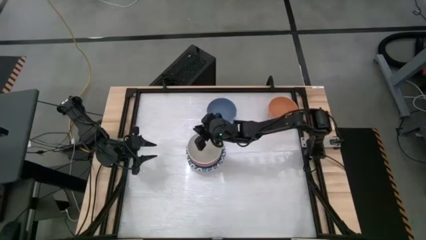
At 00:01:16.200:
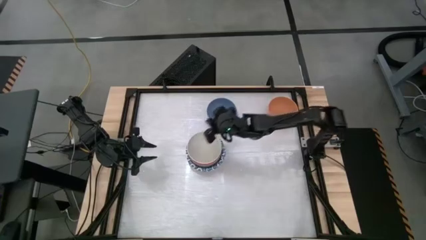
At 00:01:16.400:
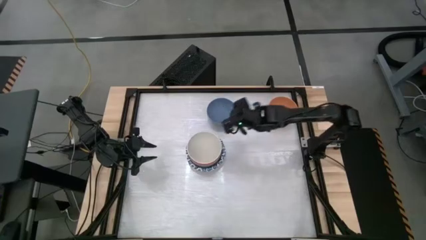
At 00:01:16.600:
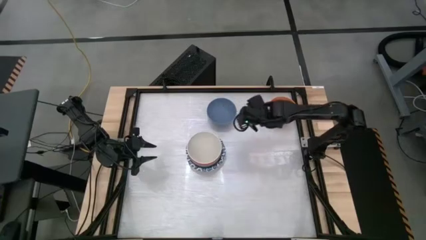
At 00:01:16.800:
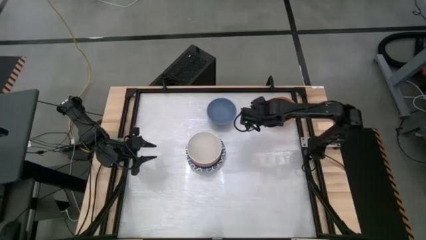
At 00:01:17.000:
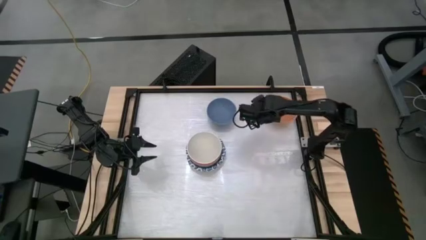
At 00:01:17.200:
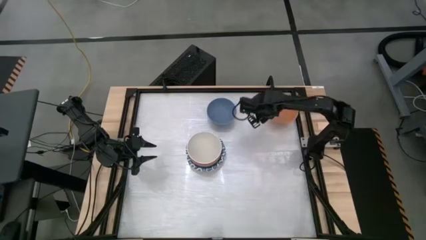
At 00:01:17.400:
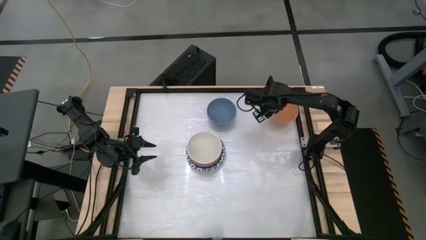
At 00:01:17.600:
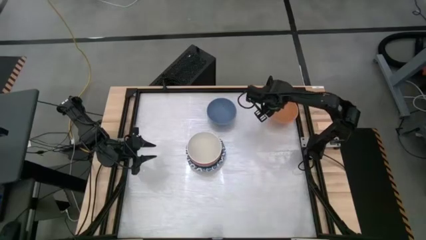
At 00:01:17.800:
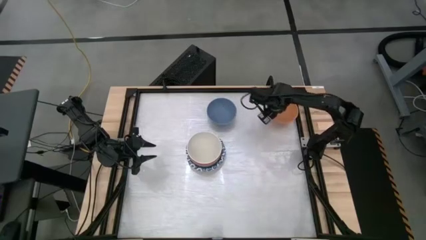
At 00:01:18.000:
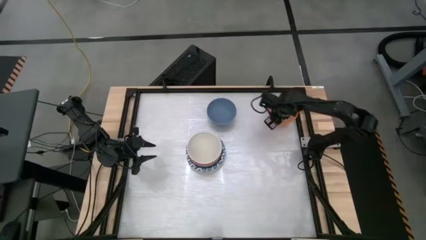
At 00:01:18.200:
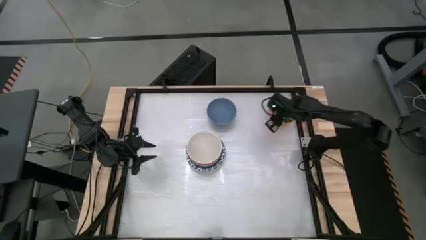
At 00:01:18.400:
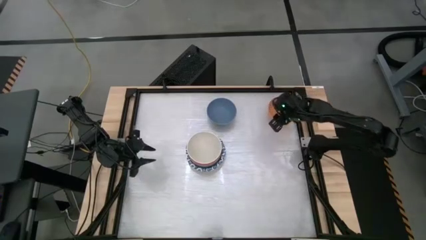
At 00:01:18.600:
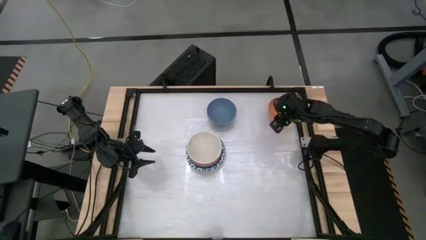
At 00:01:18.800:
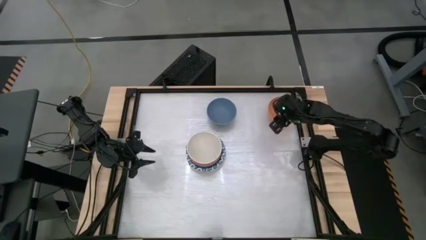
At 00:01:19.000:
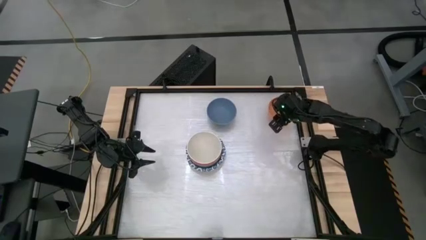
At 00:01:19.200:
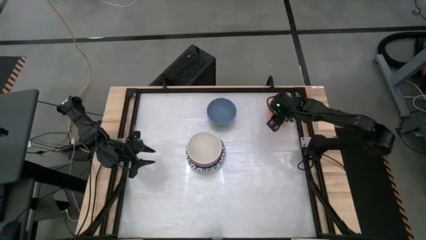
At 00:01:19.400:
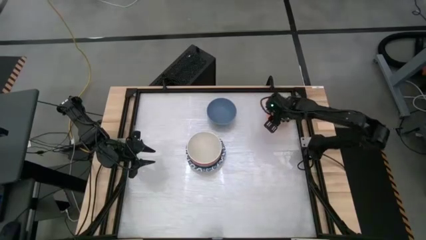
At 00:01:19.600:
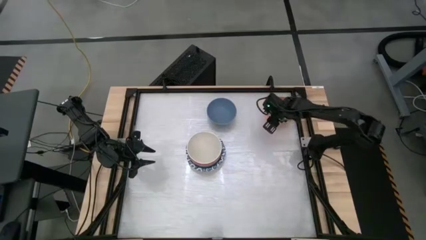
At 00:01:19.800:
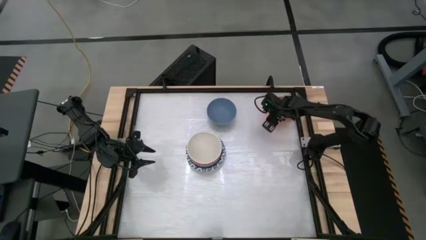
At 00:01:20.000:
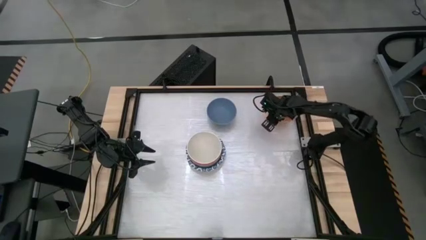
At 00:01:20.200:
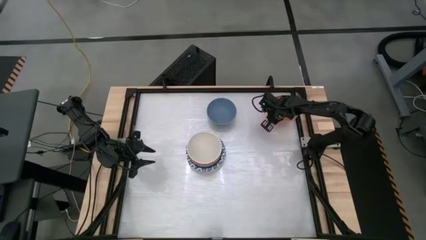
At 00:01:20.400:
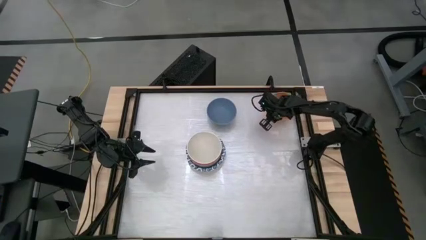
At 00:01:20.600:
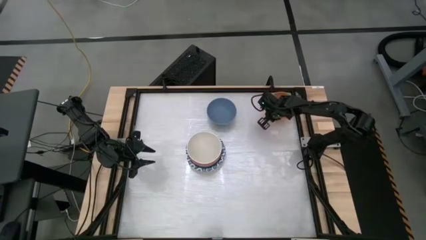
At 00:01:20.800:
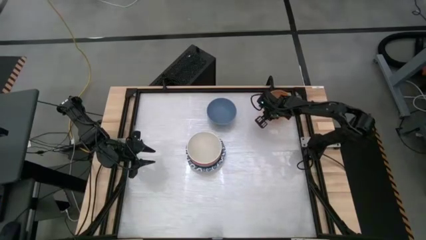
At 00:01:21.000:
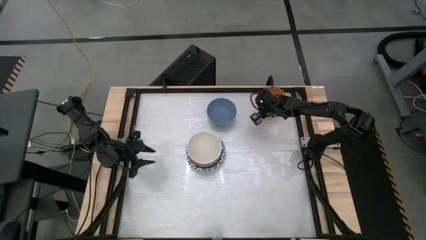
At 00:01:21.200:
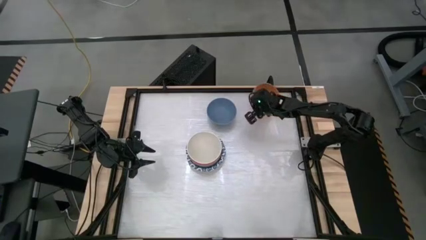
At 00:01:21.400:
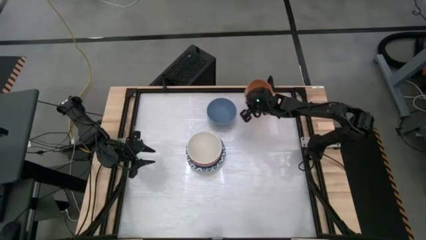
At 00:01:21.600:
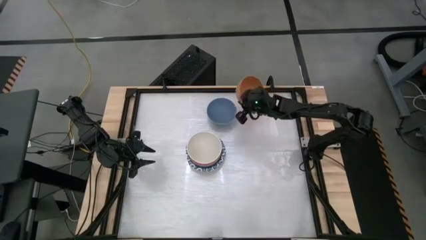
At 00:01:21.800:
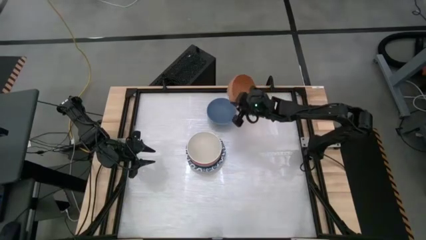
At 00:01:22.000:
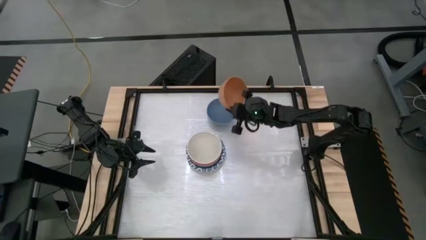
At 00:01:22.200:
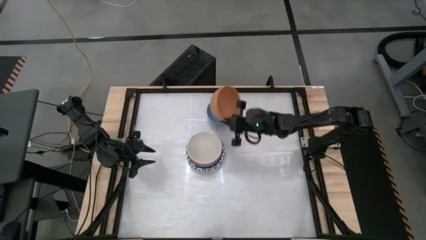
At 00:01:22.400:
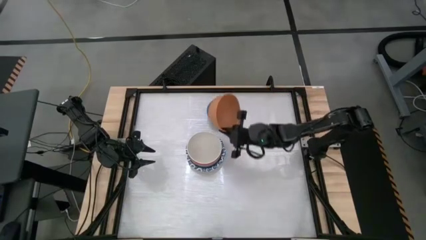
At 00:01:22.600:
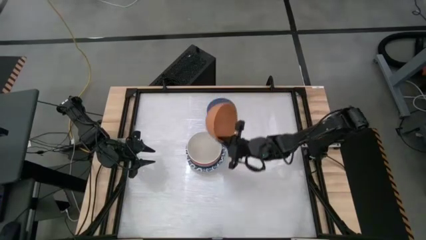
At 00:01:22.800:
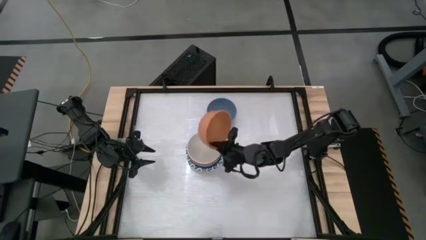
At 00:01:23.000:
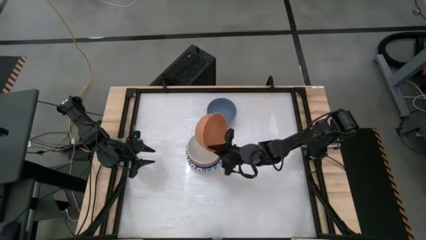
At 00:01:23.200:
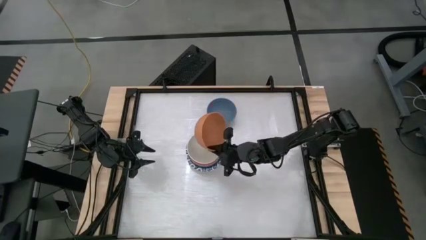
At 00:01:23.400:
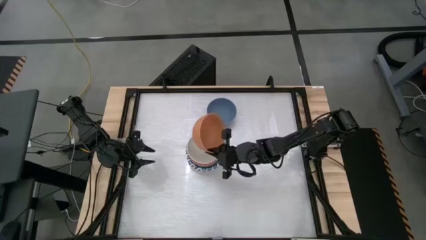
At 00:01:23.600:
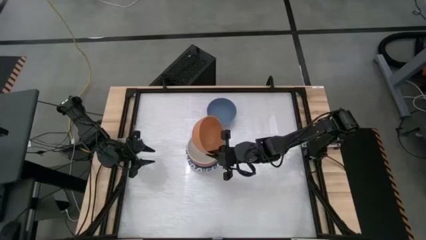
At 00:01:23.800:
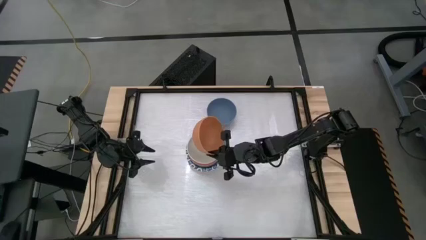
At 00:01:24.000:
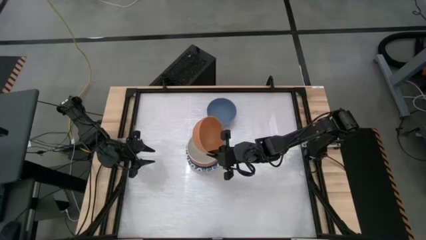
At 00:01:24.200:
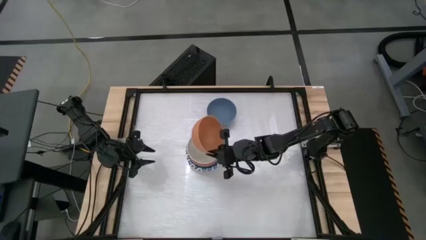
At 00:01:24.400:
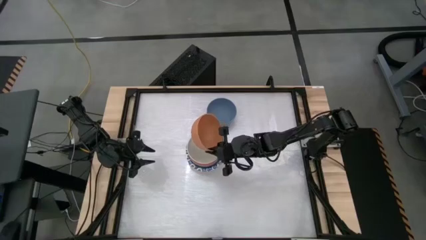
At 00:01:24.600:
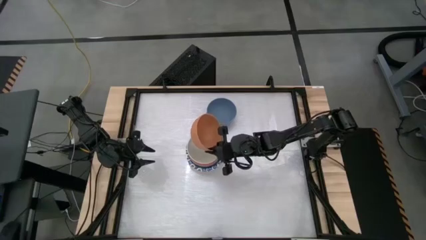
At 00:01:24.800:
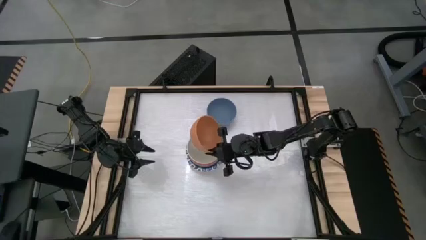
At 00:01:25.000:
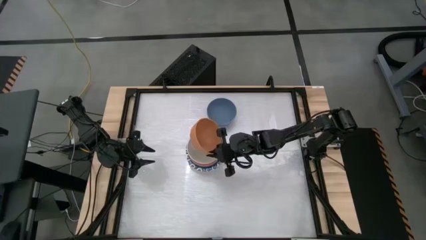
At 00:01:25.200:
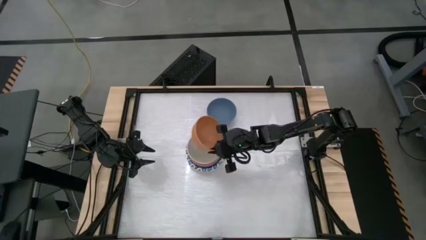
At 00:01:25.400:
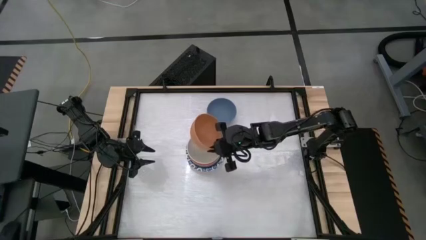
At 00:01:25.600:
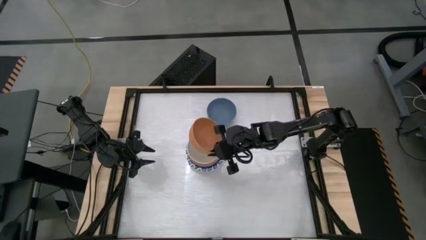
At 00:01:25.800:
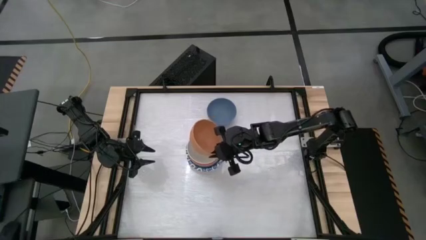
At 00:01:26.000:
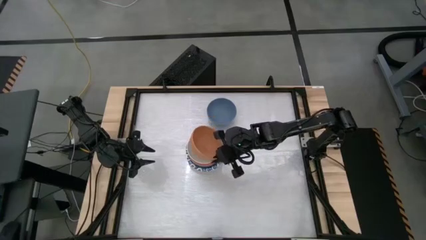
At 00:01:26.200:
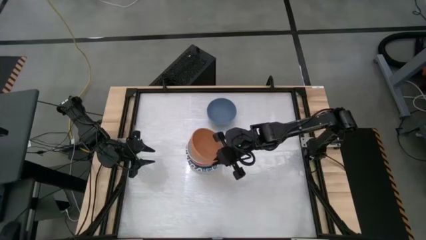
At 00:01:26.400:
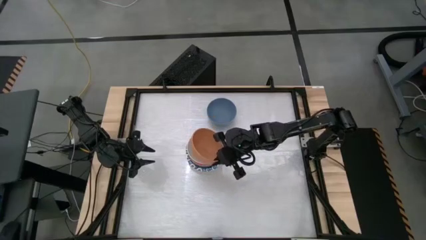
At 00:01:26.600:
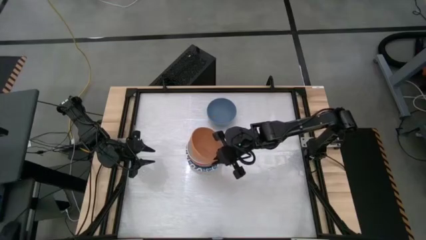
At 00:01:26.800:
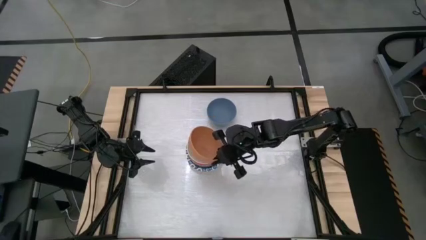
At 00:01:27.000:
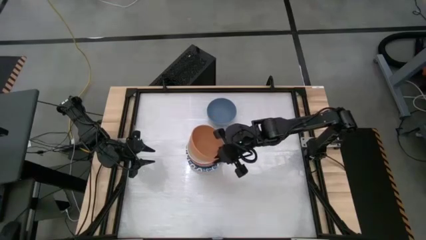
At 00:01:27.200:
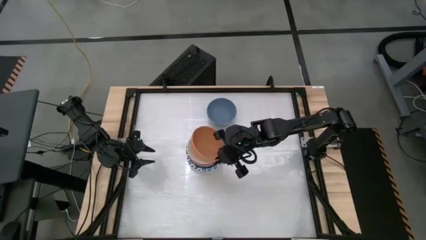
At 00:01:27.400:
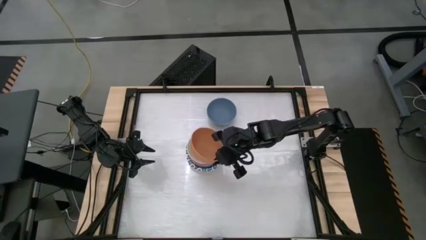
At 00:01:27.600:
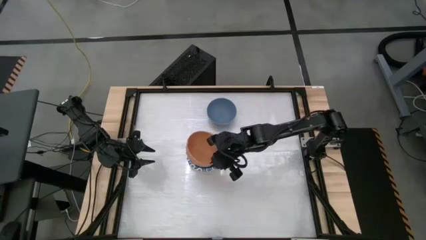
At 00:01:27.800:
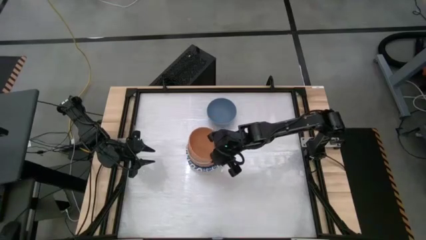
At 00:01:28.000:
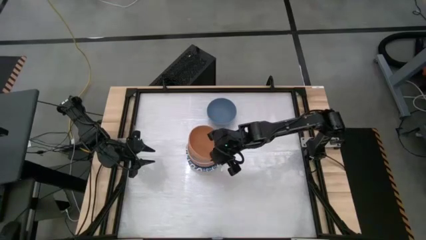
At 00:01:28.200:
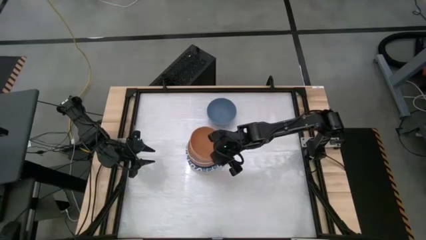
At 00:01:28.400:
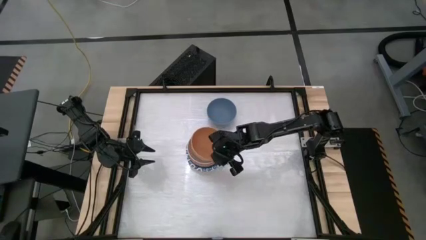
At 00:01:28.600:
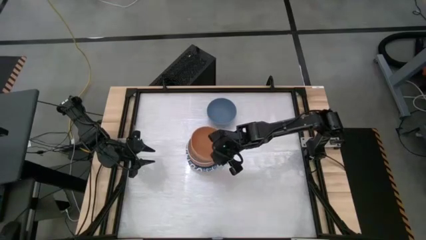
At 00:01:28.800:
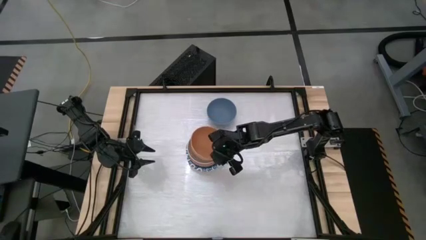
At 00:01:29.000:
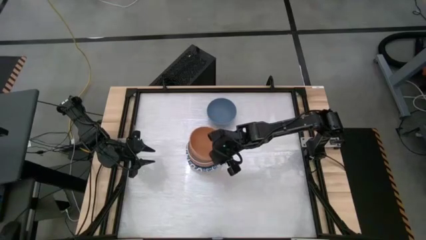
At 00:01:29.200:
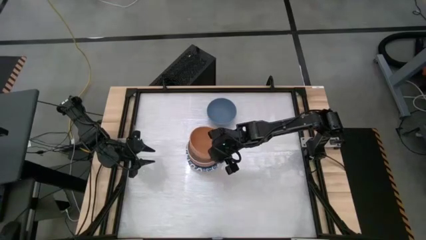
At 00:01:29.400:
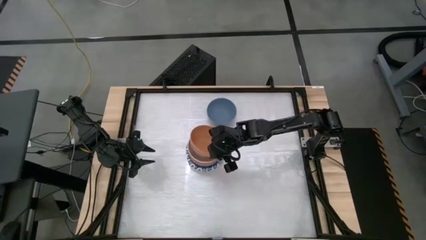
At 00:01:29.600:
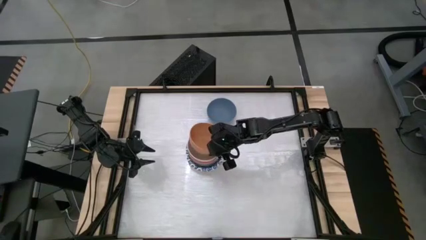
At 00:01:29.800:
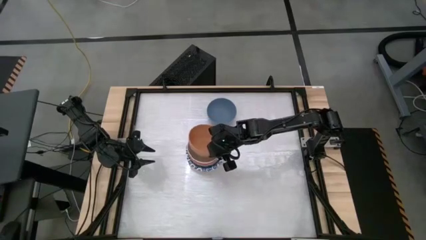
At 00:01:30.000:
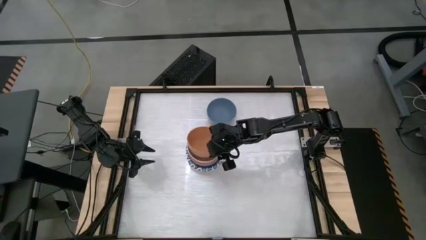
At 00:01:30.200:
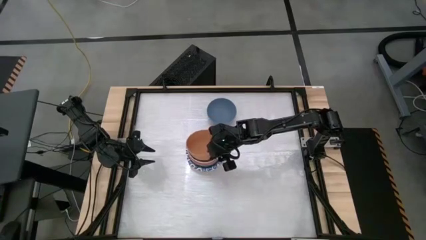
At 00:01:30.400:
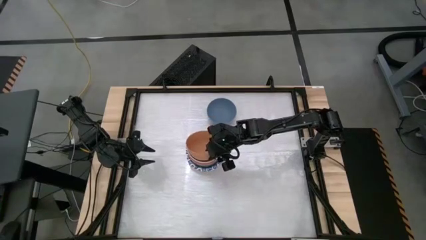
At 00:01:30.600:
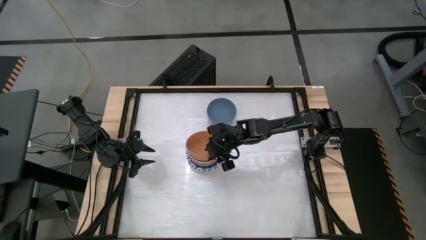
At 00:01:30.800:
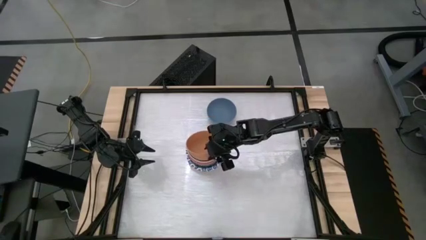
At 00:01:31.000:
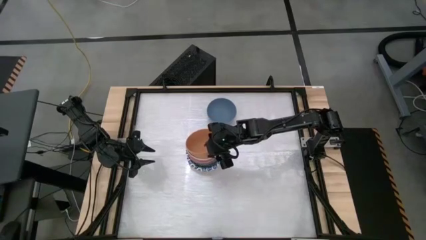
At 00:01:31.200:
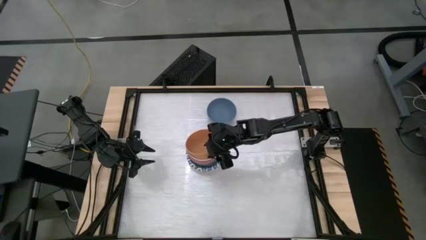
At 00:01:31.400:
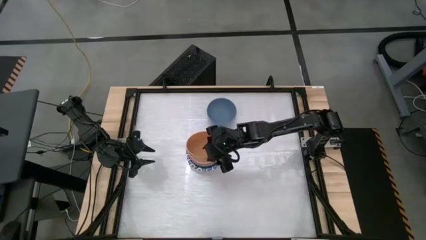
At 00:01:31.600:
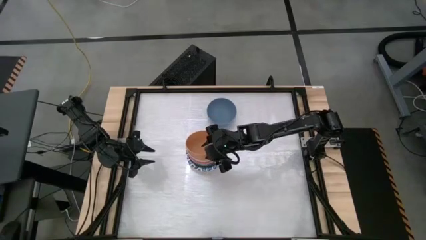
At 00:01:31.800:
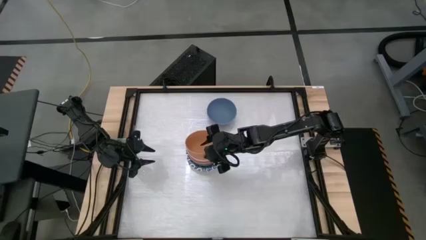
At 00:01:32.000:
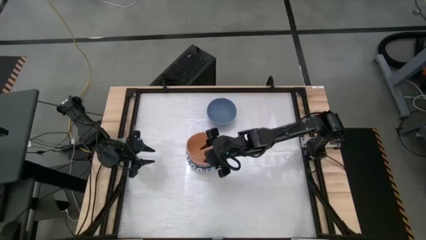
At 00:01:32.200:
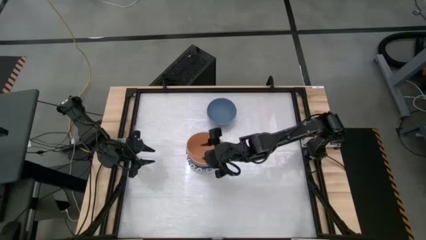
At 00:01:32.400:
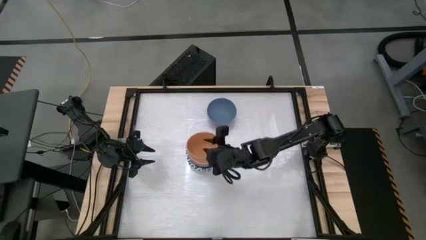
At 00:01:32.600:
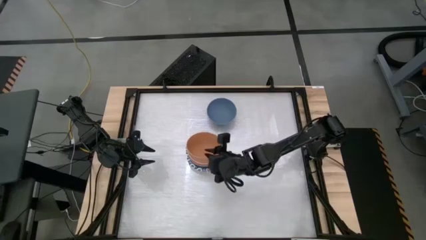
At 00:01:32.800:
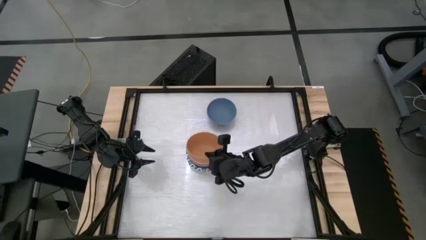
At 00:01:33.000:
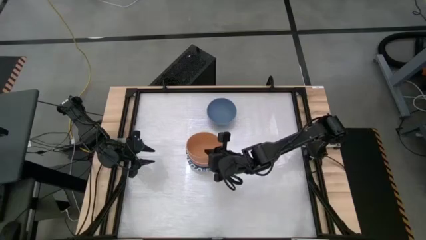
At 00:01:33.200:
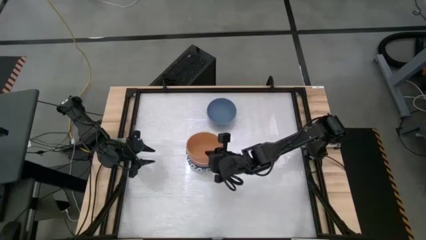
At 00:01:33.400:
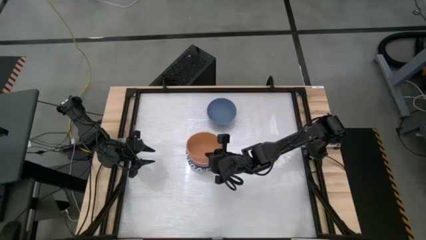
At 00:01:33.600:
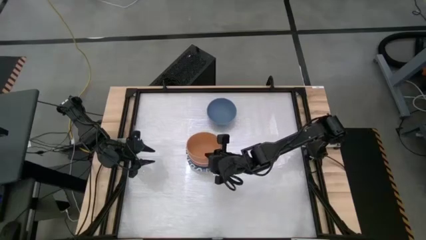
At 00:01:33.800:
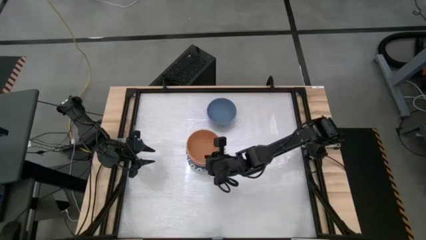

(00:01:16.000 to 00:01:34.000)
Stack the peach bowl on top of the white bowl
